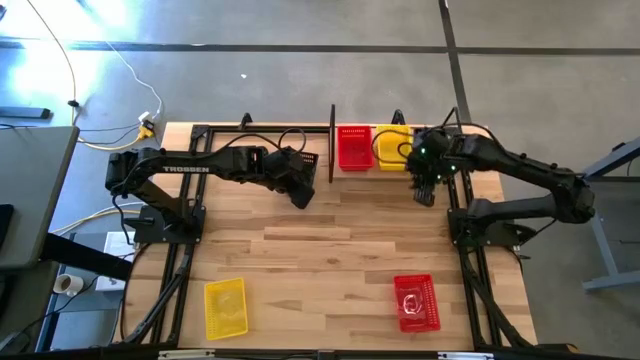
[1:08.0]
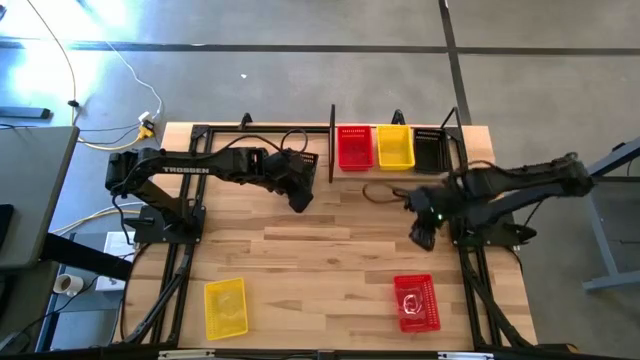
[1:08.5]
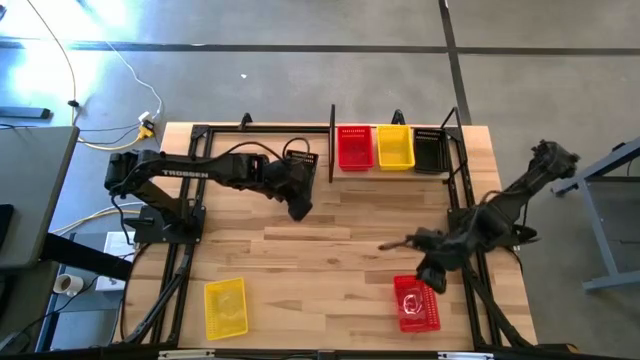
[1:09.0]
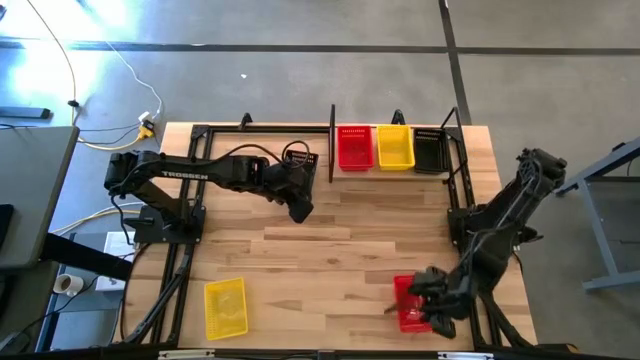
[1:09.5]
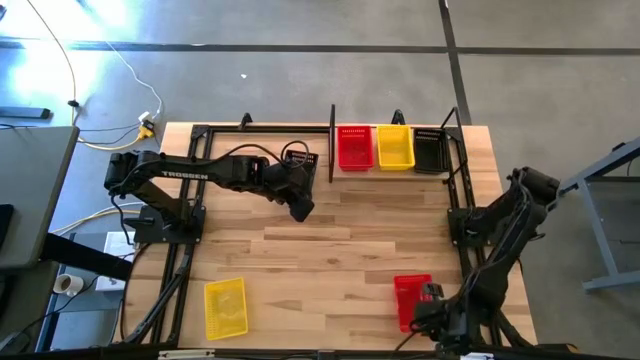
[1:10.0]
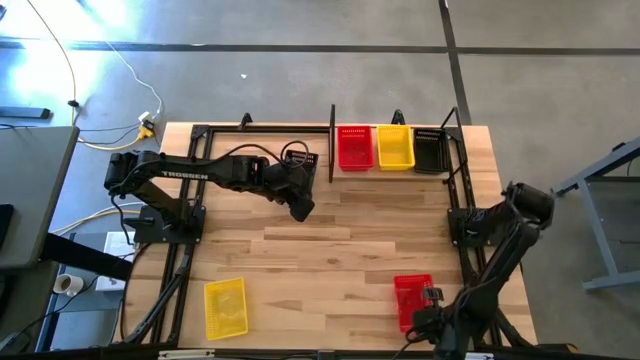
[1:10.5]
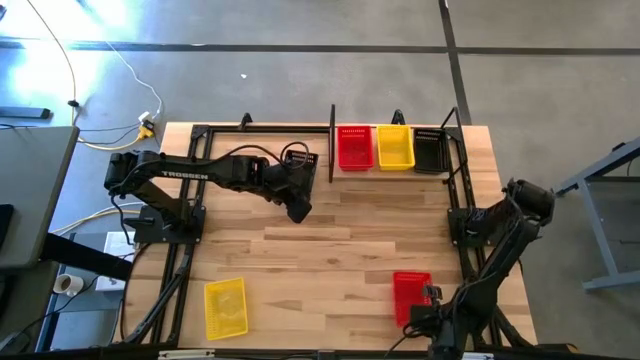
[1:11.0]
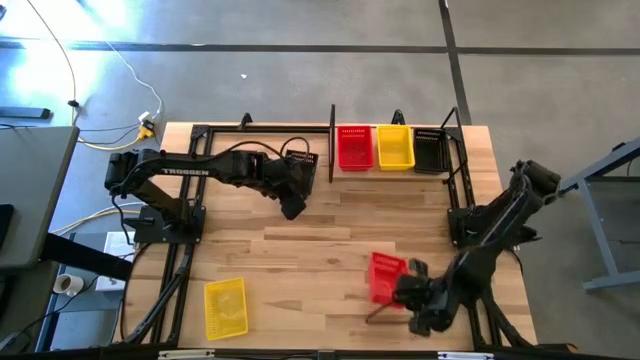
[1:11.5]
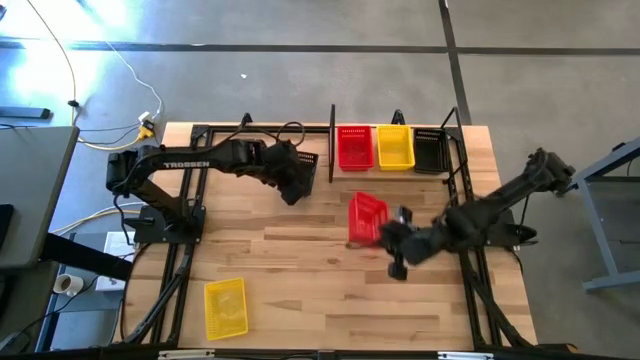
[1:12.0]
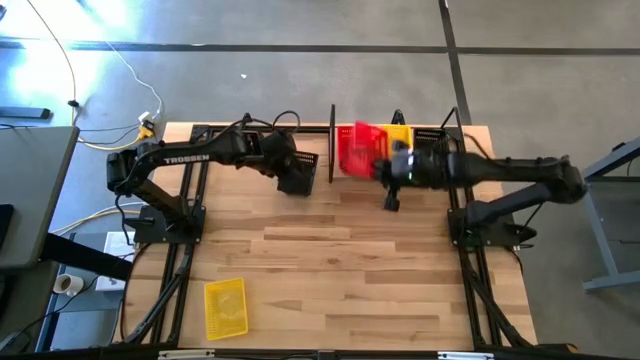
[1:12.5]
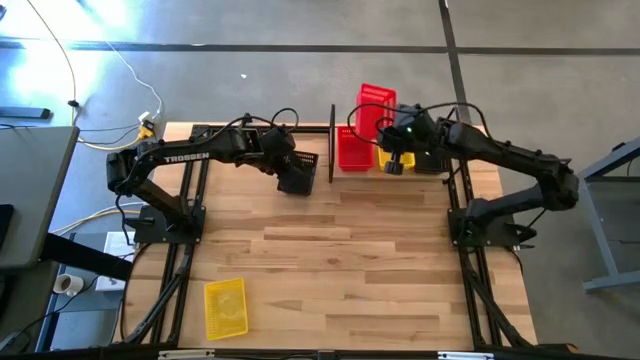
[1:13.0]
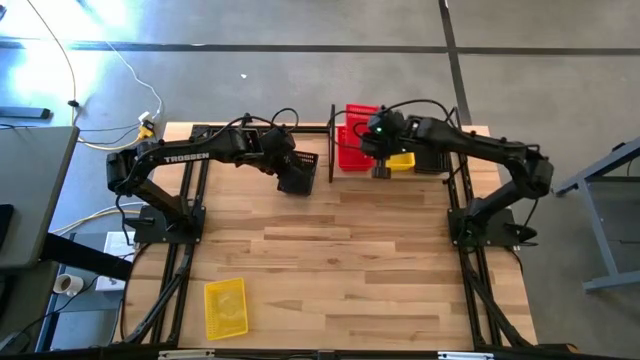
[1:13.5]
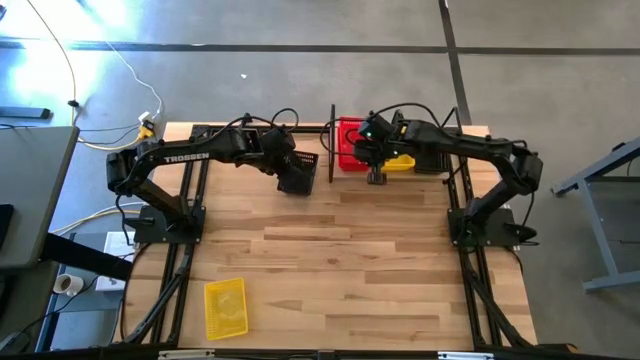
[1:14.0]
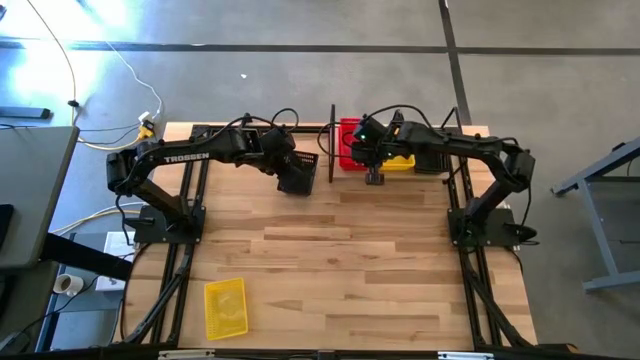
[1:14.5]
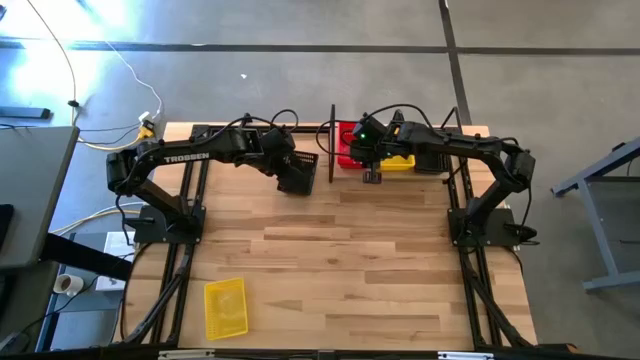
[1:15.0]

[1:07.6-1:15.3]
Task: Stack baskets on shelf by color
Stack the red bin on top of the red bin on the shelf

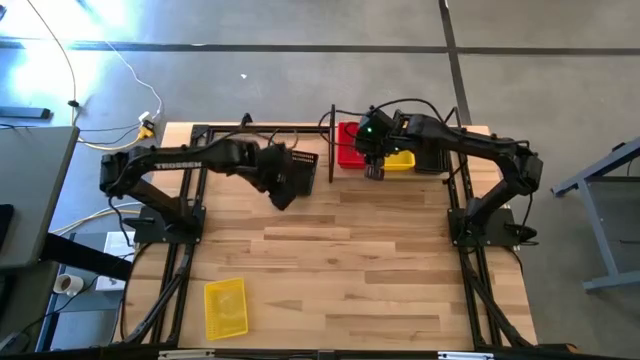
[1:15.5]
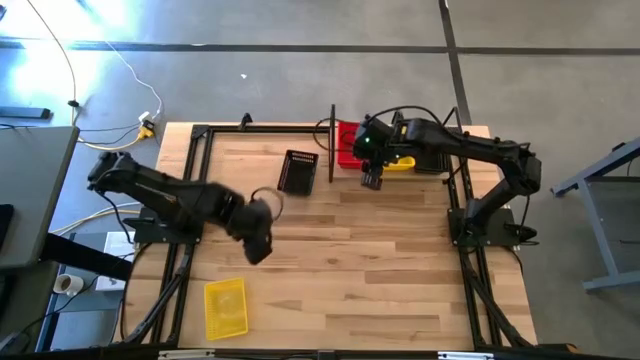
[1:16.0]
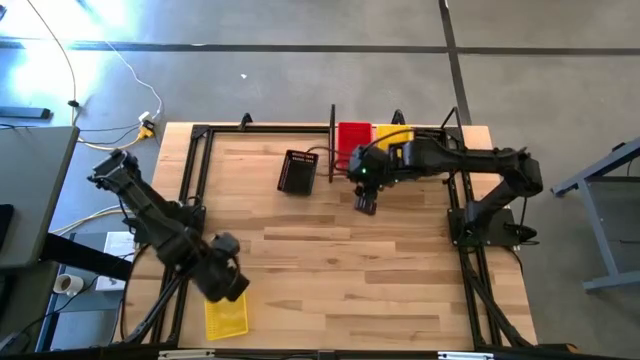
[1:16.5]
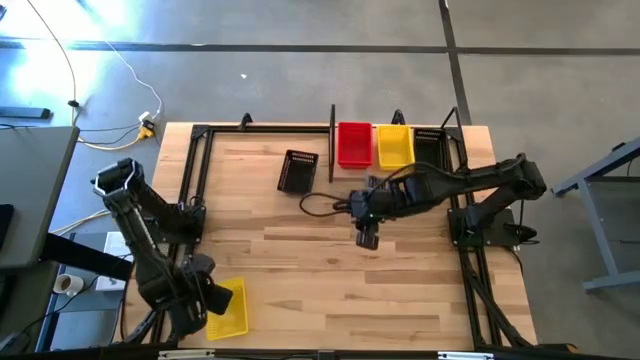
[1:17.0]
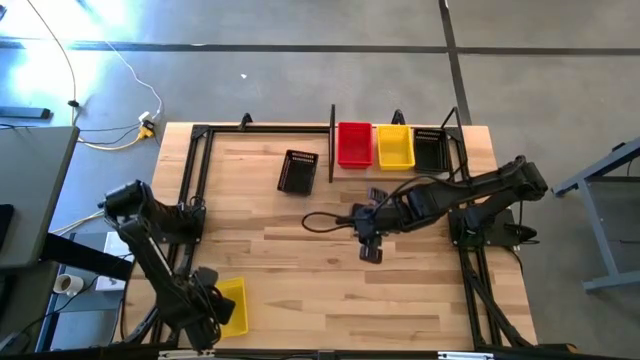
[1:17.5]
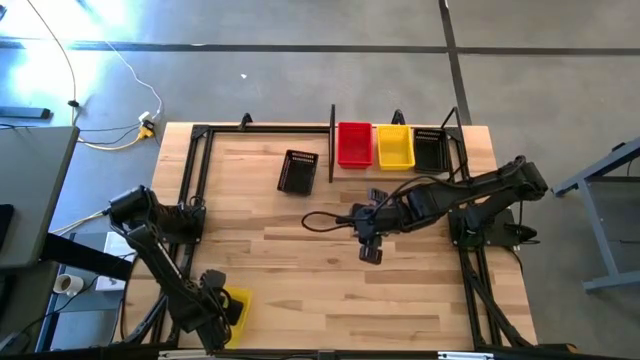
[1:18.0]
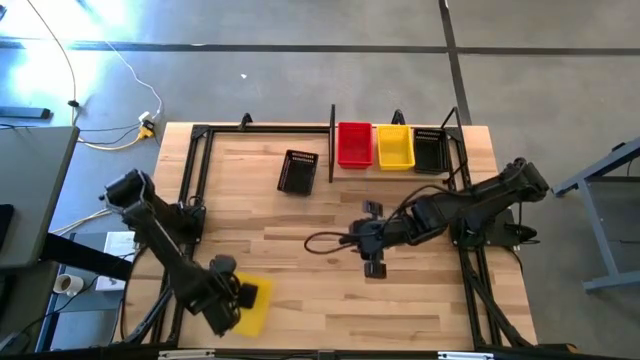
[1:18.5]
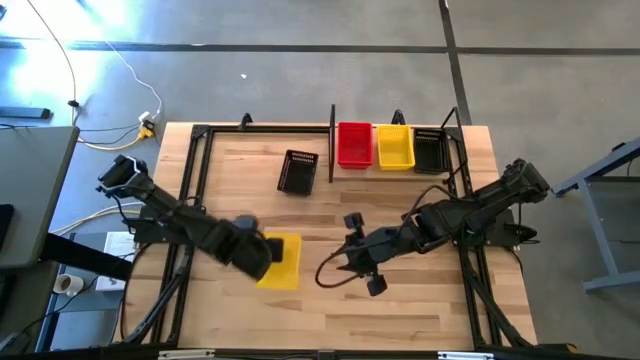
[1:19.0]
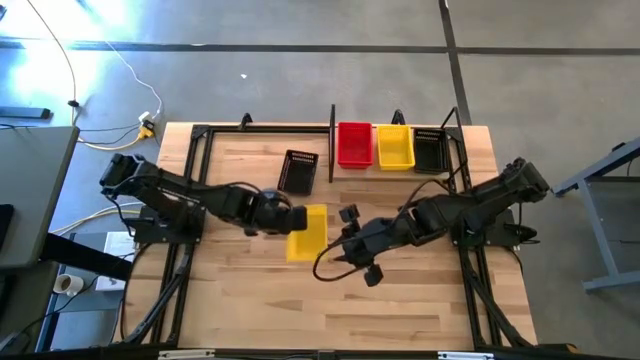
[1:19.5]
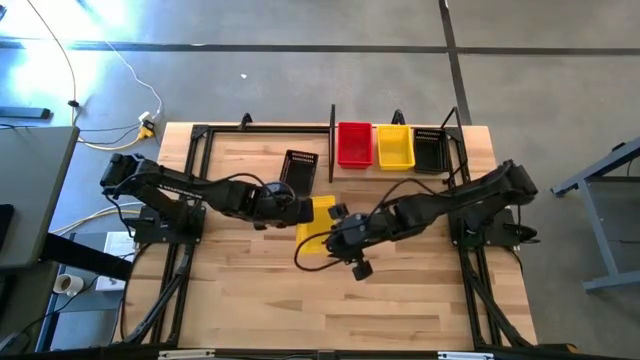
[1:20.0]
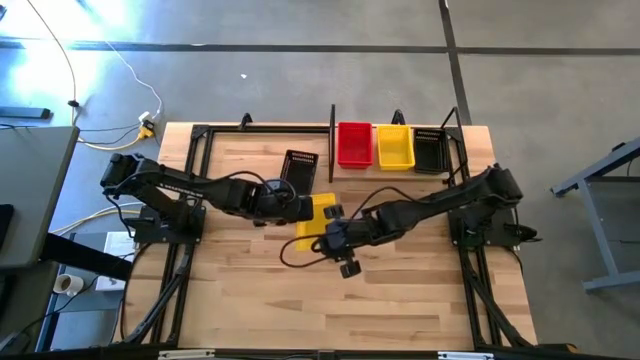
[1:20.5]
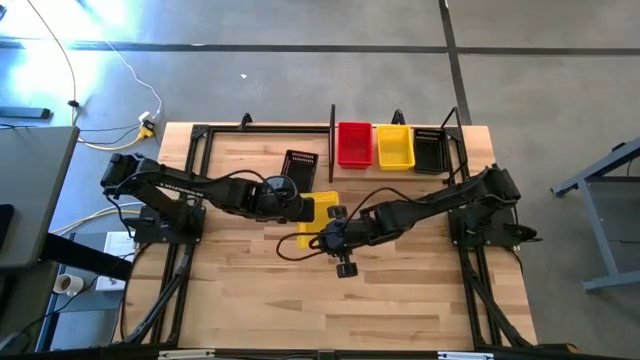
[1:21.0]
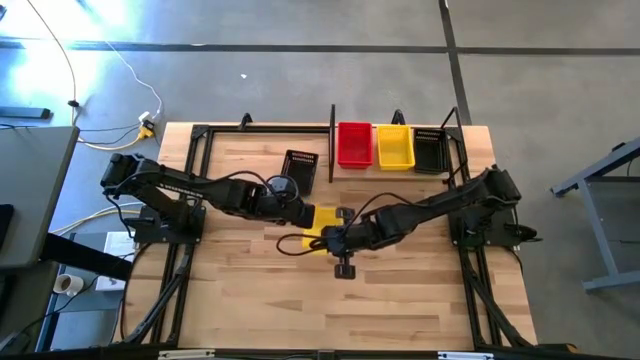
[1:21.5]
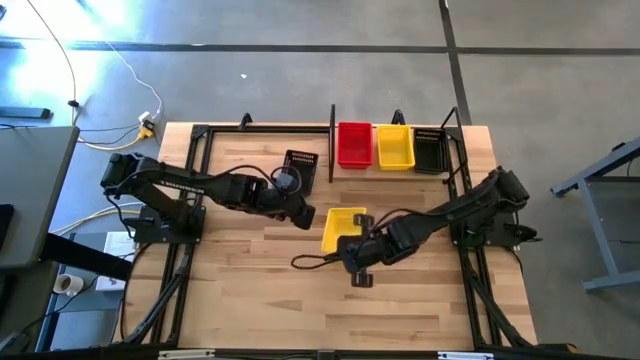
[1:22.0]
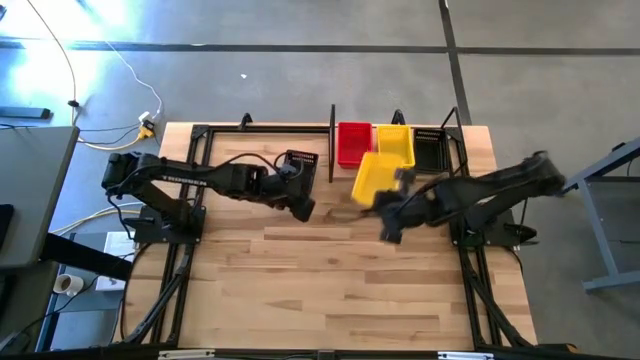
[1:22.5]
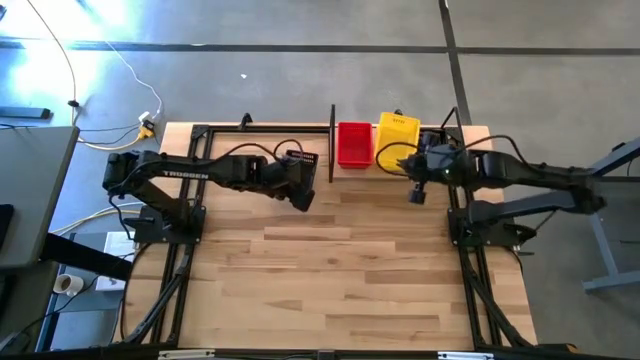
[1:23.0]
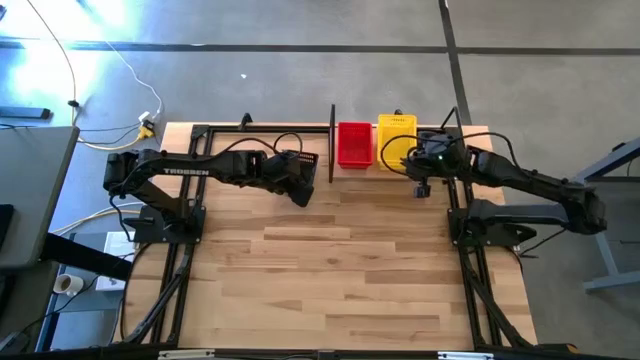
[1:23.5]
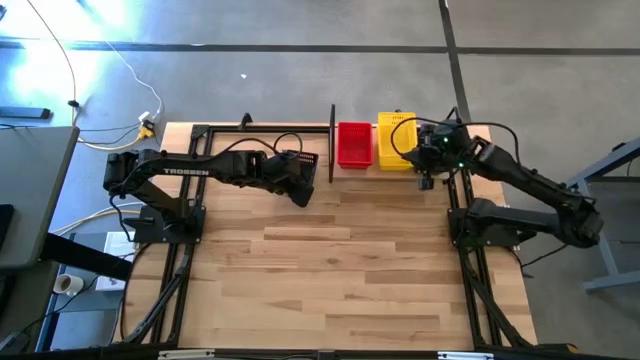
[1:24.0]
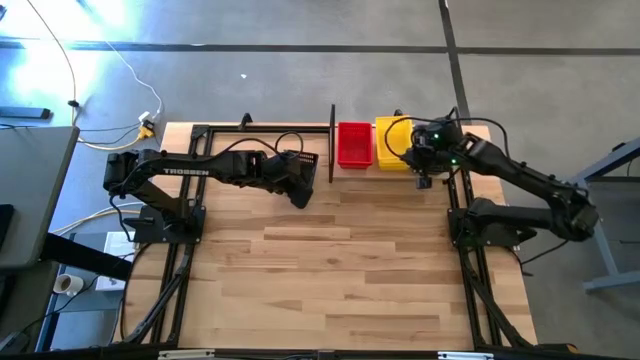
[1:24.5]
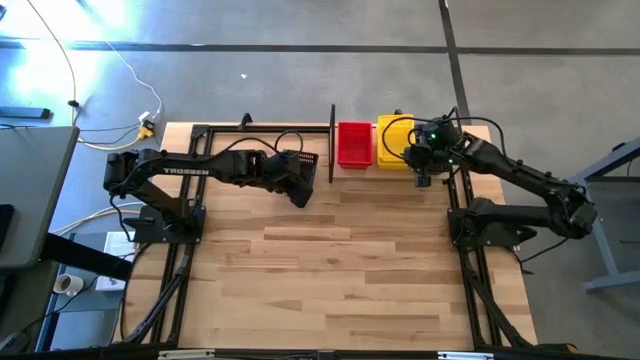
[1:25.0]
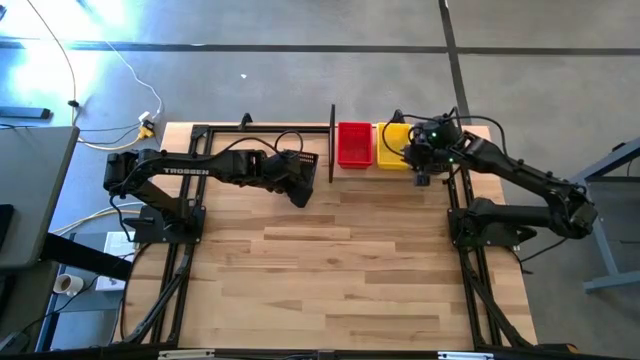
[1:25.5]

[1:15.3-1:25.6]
Stack the yellow bin on top of the yellow bin on the shelf

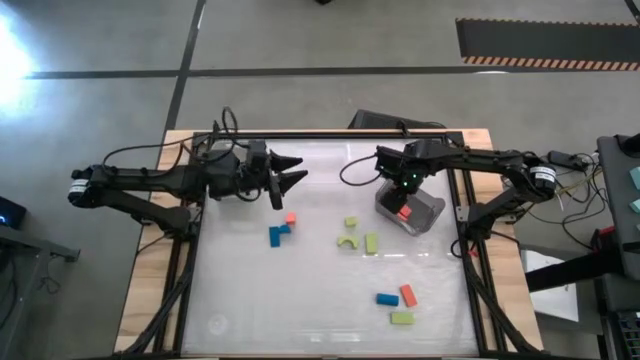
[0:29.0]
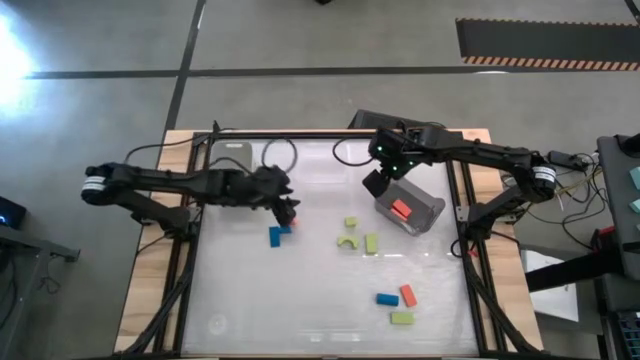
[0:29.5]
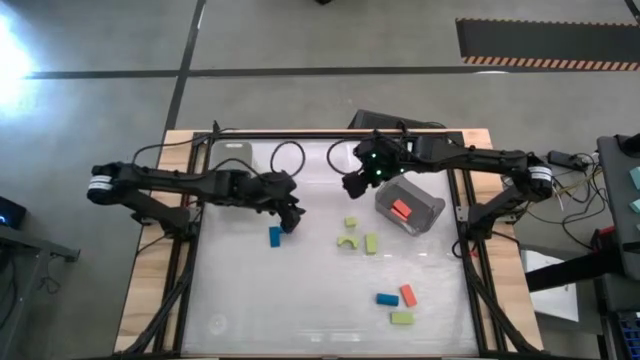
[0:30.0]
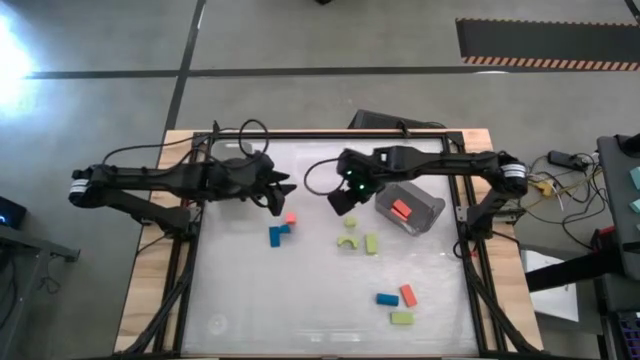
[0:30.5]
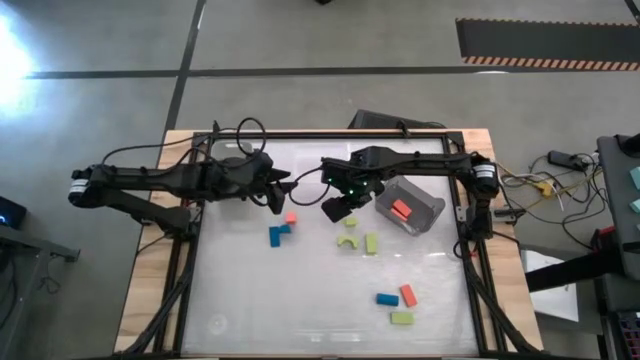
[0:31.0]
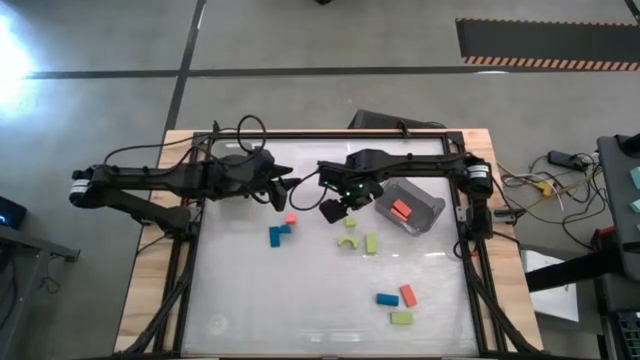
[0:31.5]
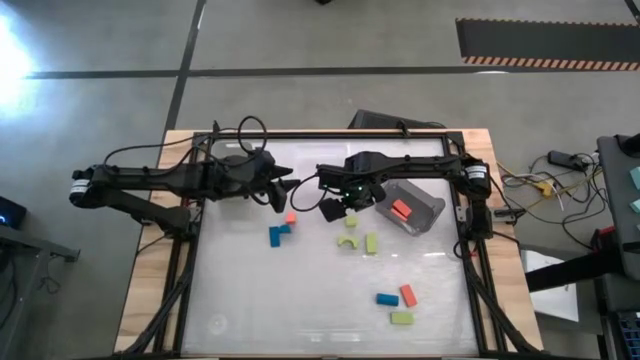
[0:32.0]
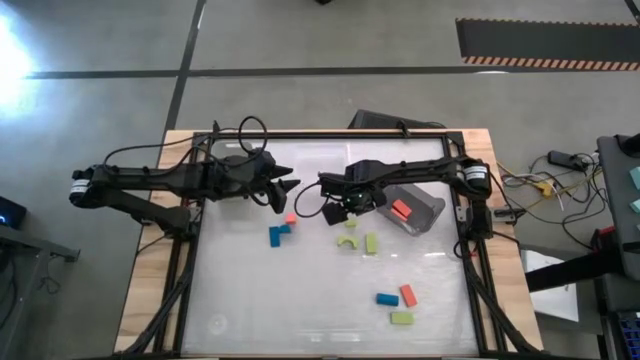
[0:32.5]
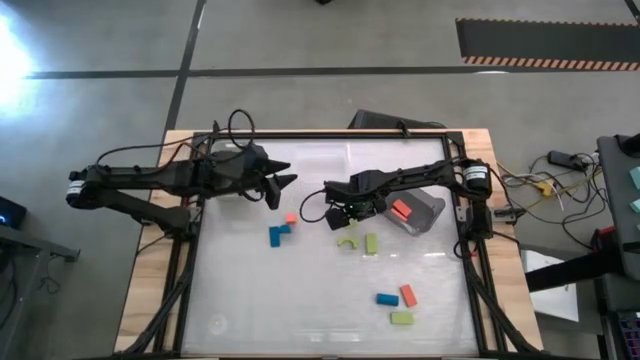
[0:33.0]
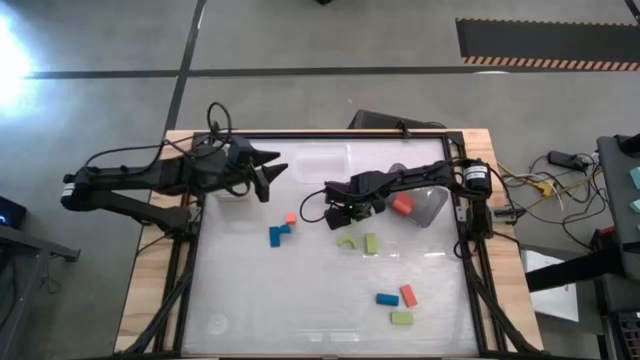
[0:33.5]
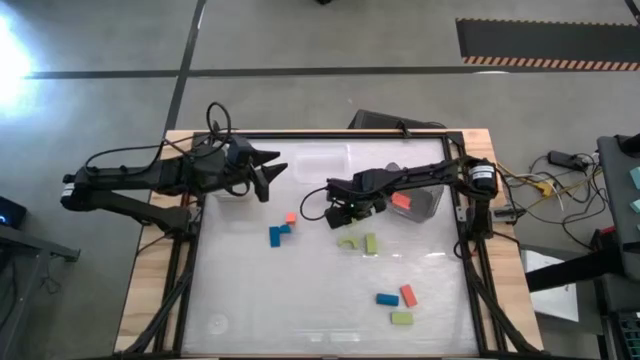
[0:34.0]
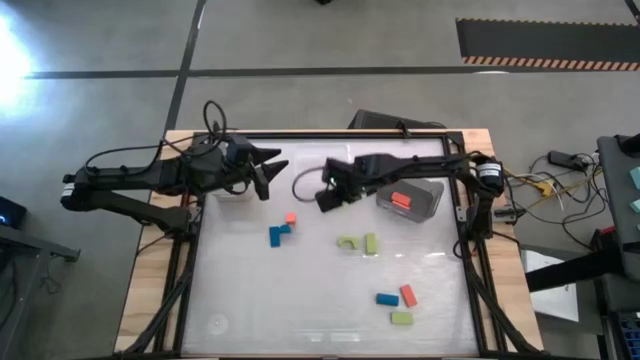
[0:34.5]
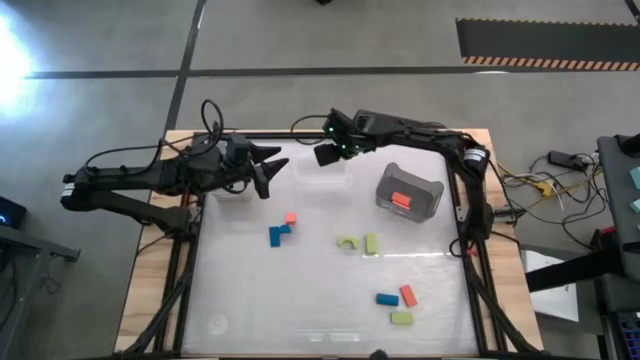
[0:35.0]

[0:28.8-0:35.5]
Task: Sort & place blocks by color
Put the green block into the transparent bin
